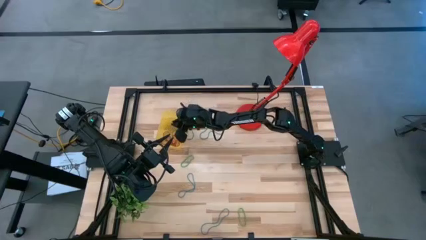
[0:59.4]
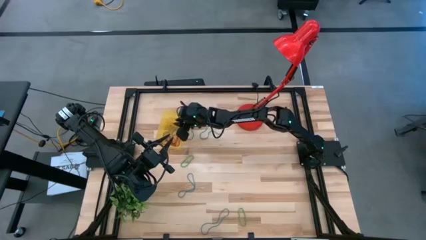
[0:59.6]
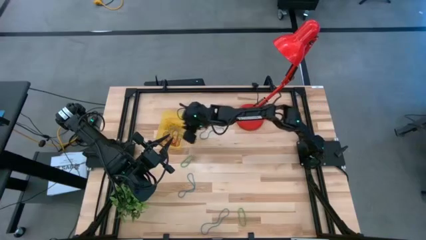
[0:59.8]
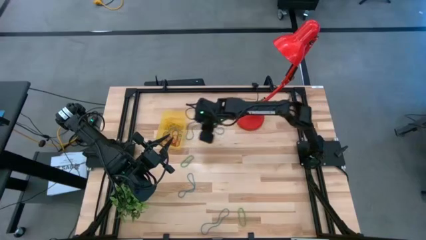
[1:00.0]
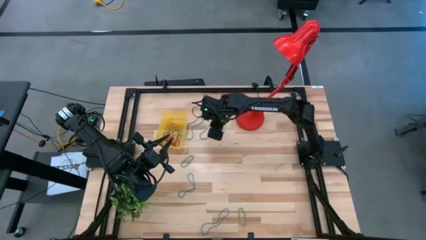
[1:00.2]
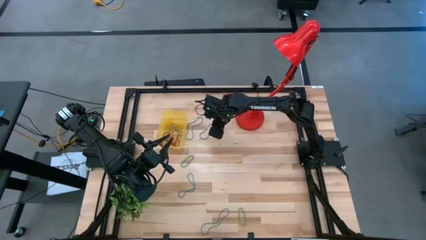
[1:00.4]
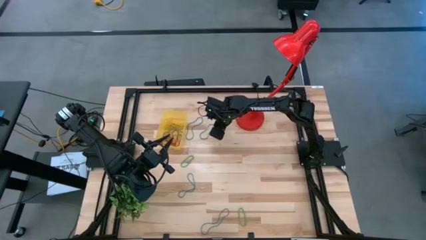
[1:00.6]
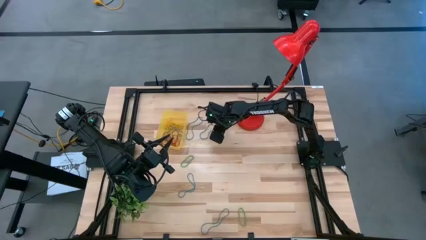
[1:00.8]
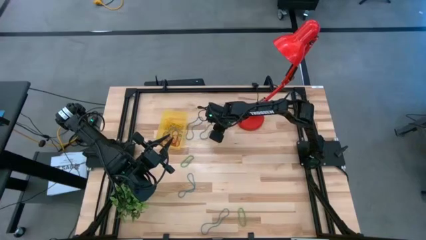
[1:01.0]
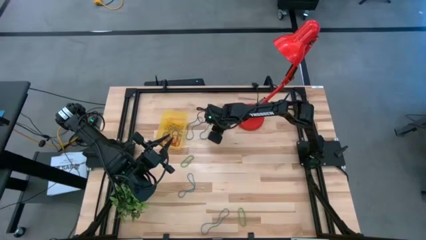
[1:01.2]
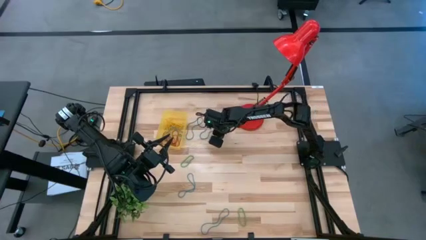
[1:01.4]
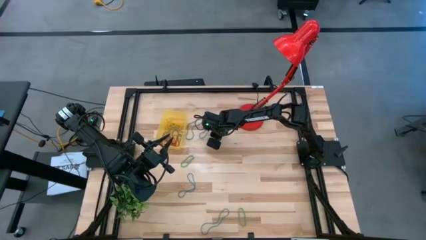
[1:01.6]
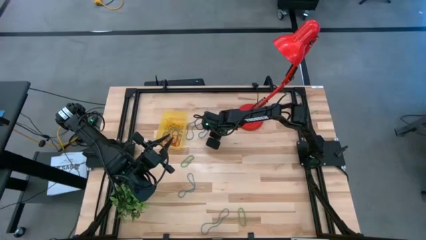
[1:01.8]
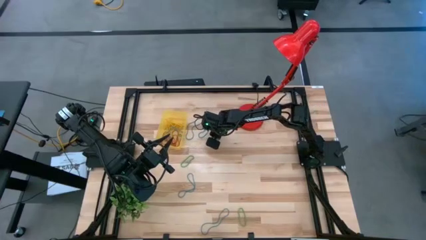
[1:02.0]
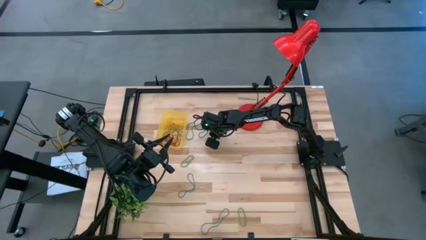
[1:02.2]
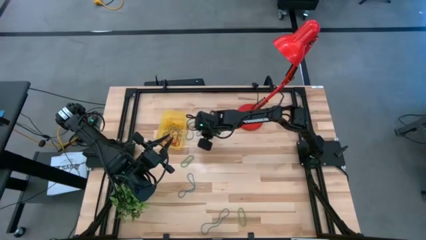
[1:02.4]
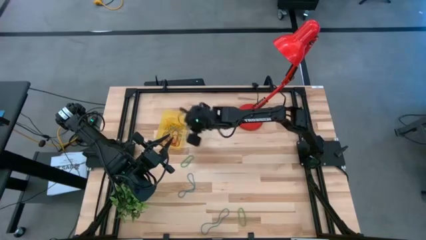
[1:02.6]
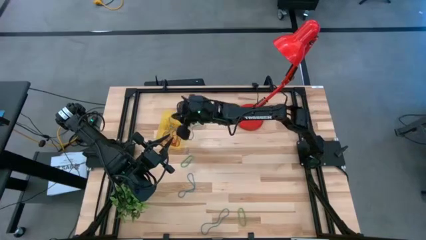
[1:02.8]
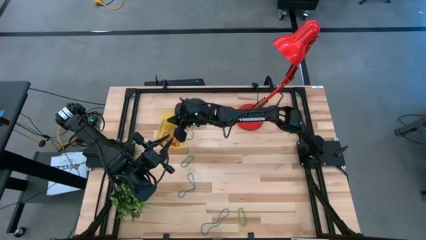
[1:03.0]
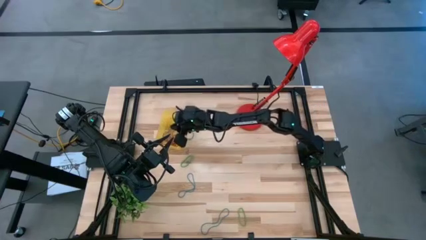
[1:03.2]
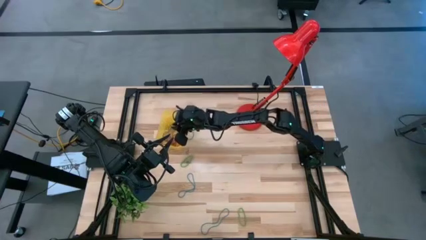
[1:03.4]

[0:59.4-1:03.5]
Task: Pick and place items into bin
Put the blue rubber band into the yellow bin

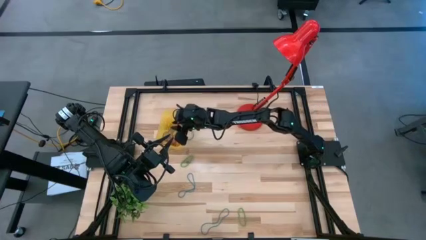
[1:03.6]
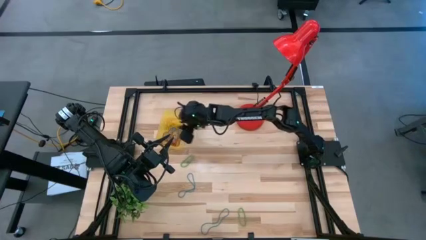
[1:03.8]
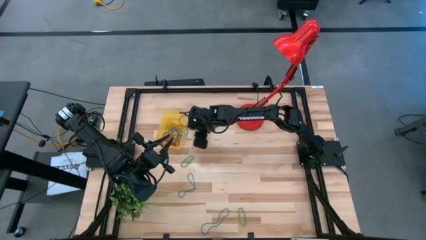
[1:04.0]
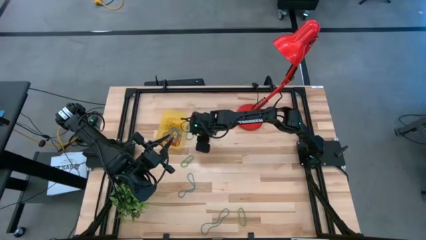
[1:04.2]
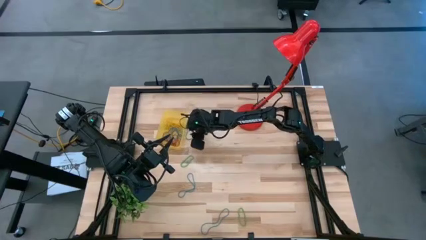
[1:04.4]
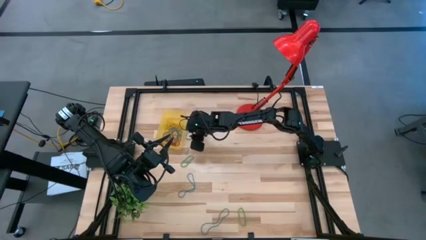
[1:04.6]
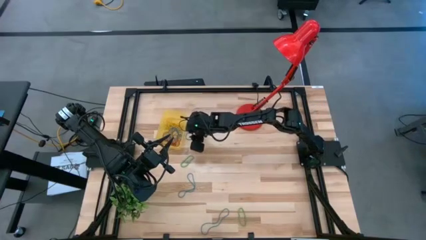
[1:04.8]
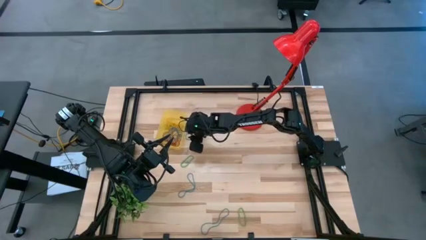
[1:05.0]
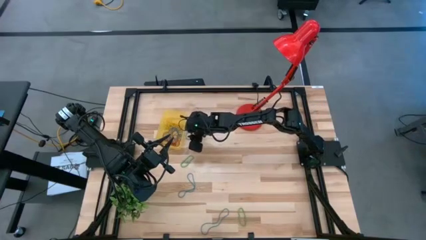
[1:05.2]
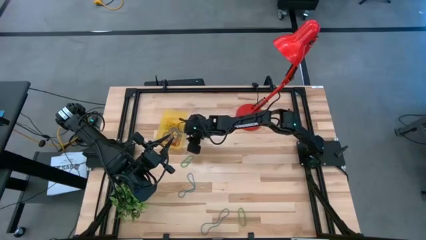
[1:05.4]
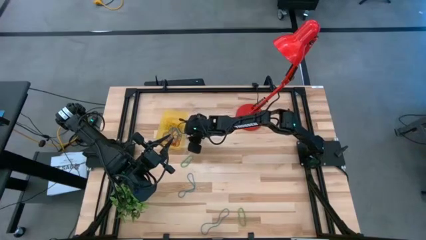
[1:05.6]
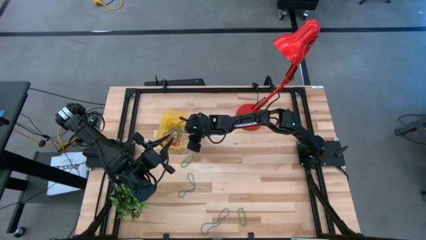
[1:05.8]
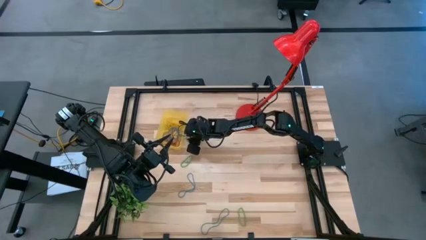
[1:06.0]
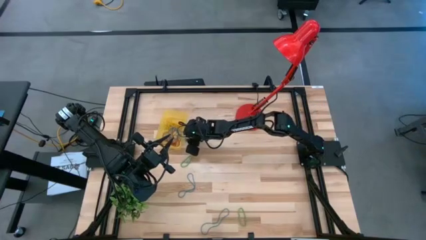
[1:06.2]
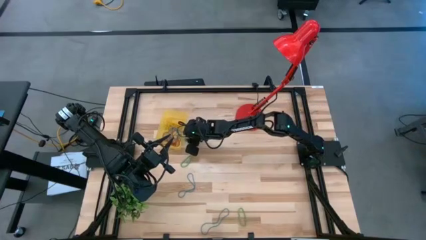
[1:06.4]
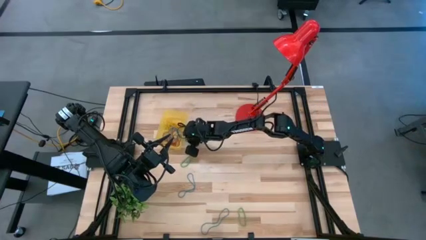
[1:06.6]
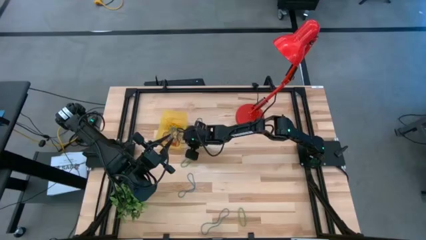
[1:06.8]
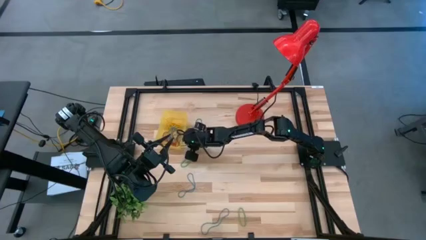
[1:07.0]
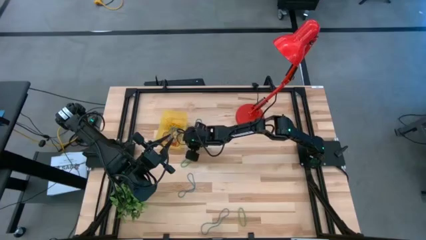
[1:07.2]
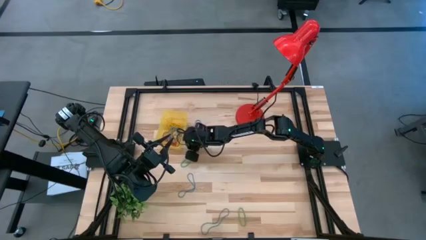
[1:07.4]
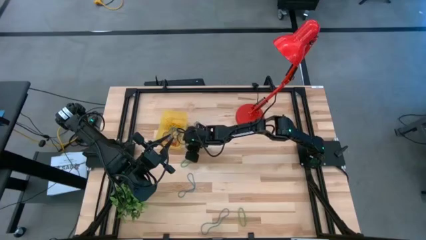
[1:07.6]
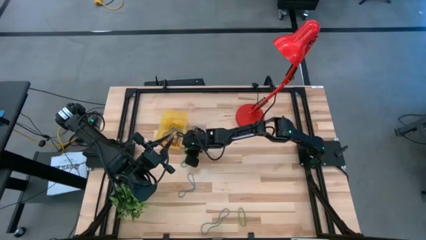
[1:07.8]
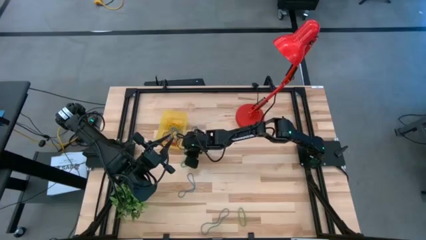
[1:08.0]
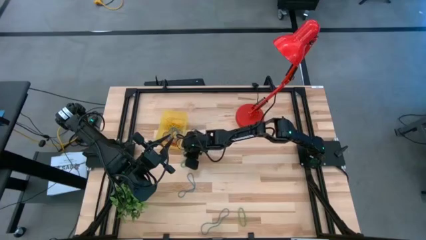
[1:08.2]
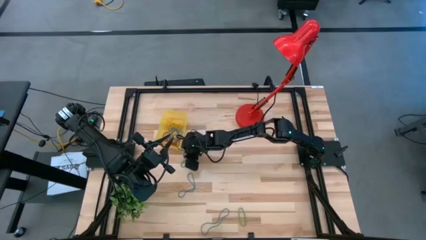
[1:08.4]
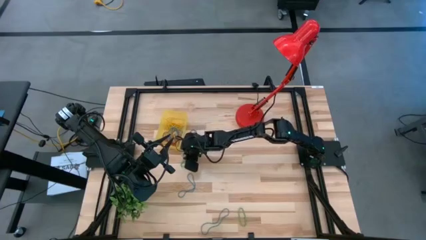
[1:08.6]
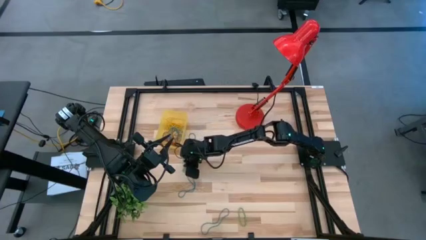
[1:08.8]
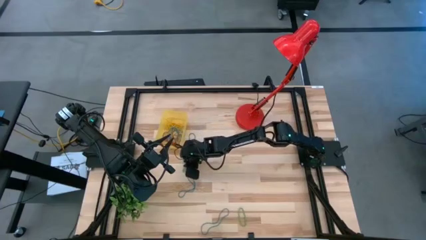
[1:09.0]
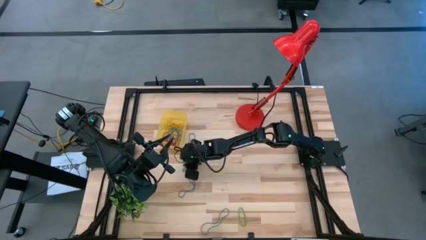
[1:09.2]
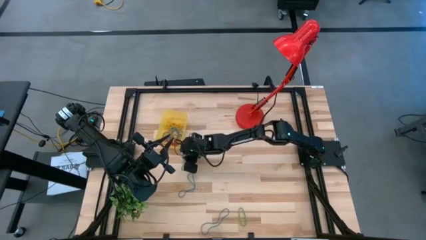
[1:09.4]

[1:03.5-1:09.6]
Put the blue rubber band into the yellow bin

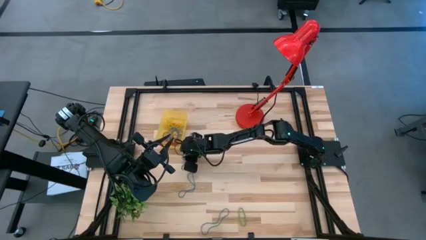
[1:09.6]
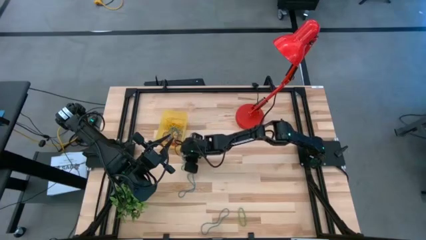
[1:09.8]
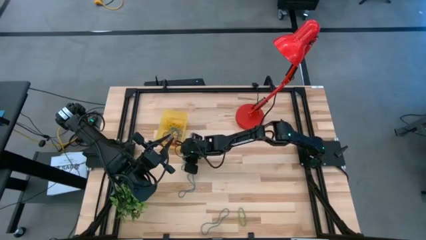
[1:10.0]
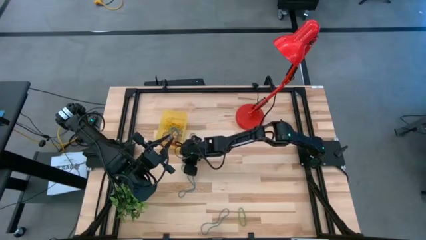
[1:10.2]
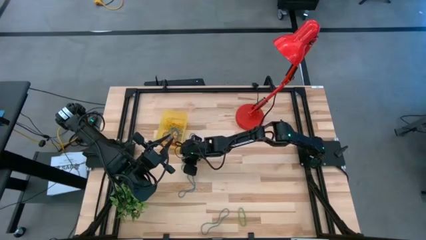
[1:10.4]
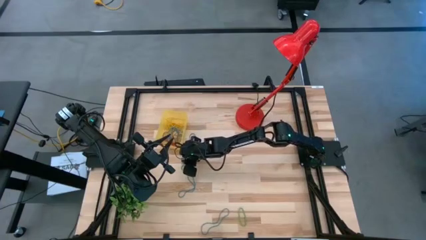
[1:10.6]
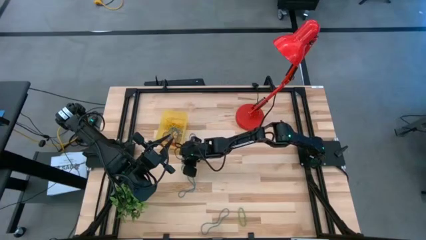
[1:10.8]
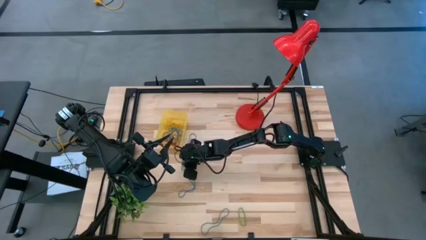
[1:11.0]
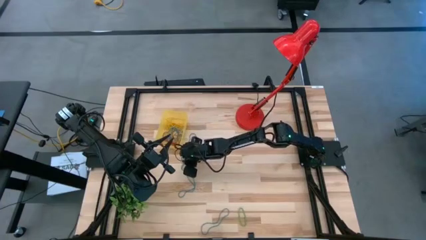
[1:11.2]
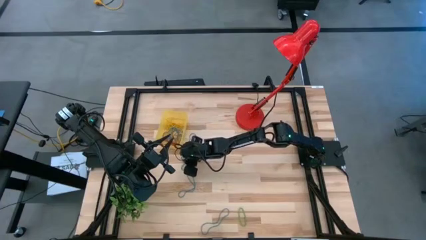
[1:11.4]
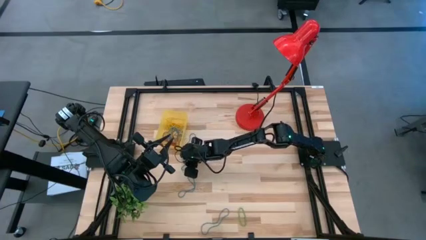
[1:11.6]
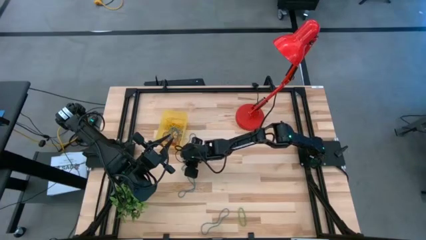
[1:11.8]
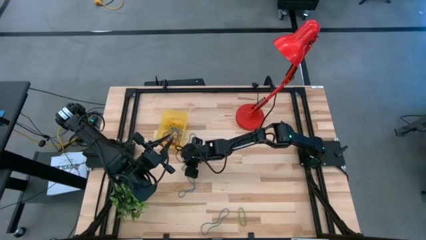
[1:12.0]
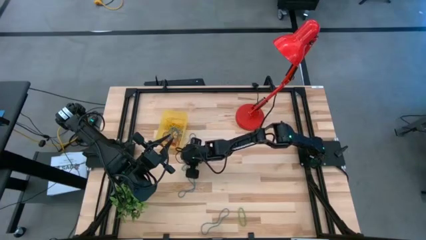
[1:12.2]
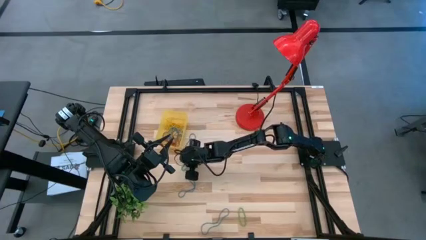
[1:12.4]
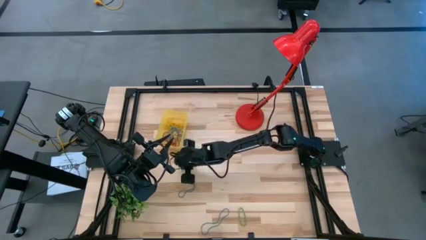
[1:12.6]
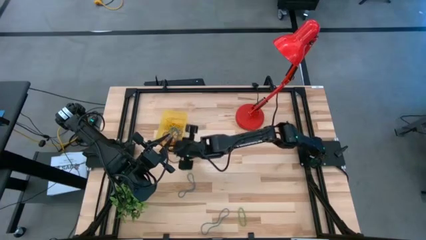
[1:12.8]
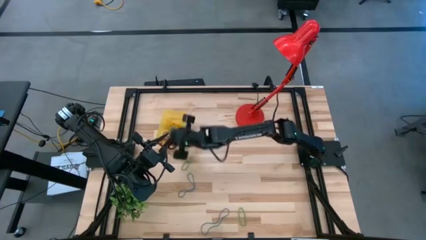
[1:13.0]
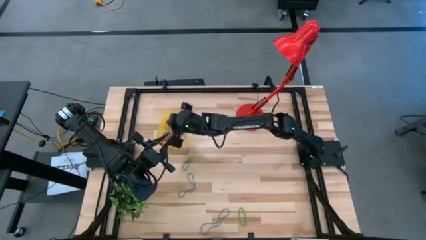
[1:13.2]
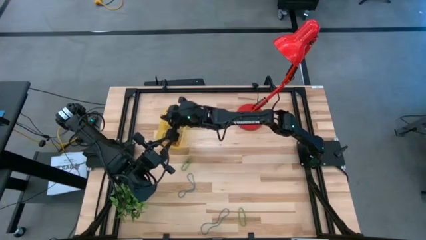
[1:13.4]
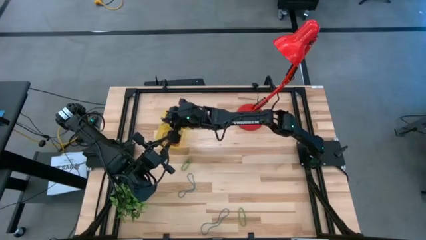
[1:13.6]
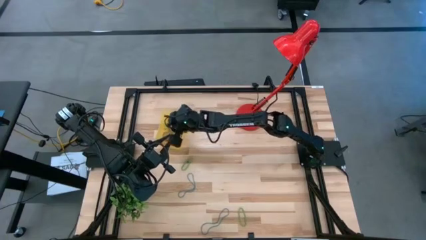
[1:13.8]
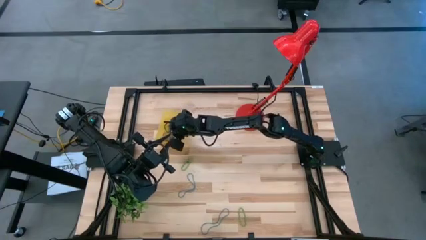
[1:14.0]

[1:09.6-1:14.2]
Put the blue rubber band into the yellow bin

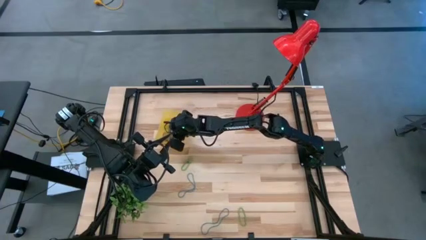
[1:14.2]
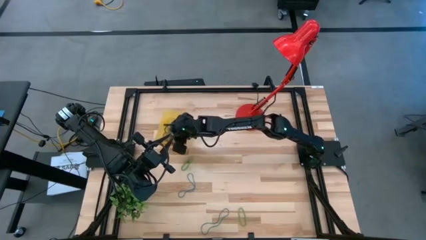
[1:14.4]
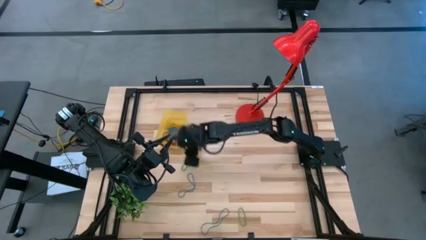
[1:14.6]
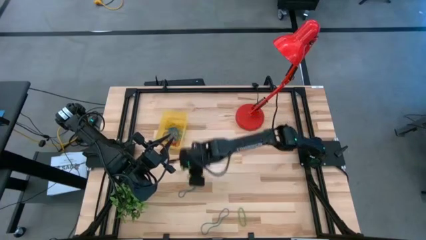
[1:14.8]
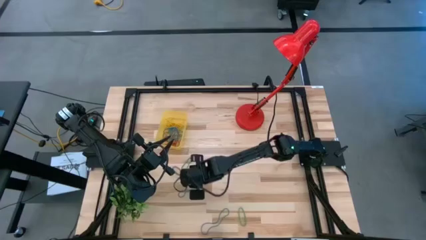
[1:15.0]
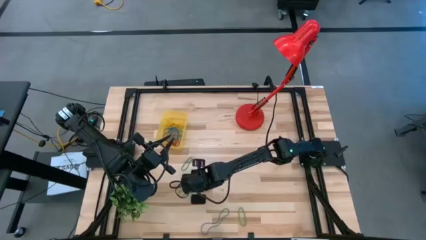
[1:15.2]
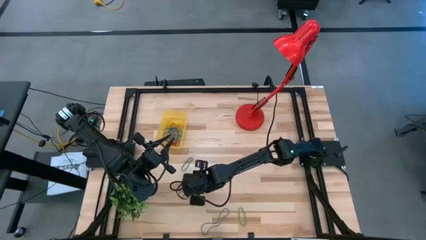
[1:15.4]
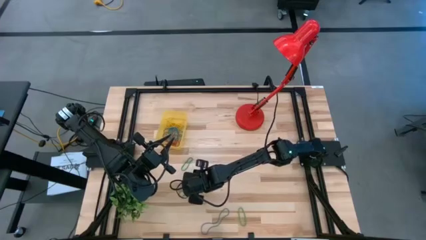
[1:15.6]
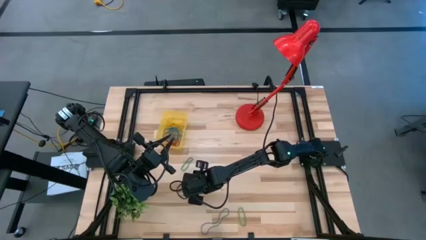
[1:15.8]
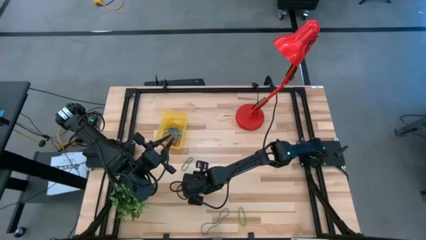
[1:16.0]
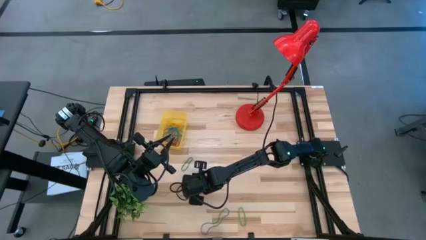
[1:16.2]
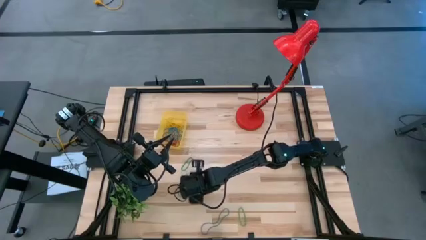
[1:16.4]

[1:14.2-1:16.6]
Put the blue rubber band into the yellow bin
